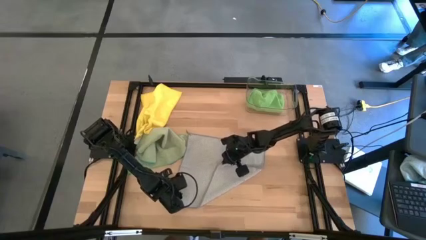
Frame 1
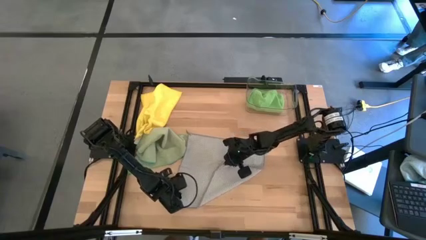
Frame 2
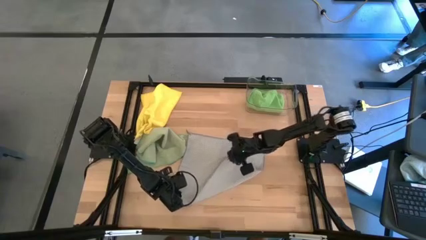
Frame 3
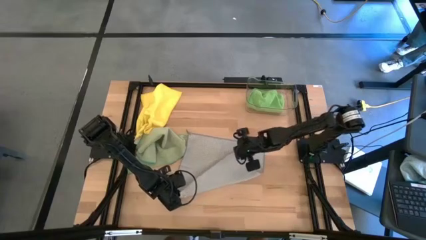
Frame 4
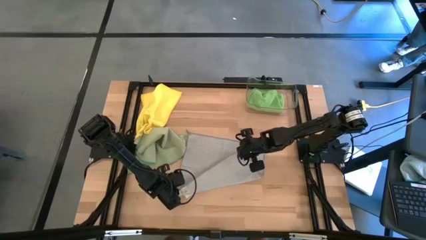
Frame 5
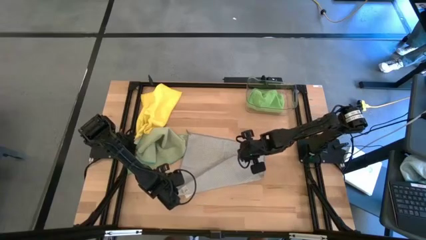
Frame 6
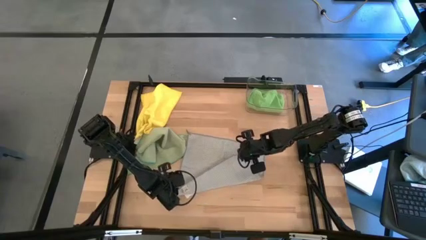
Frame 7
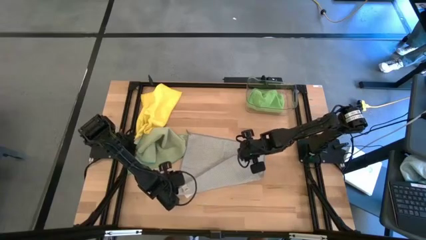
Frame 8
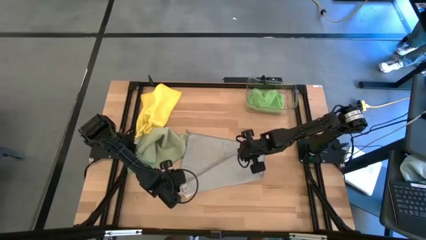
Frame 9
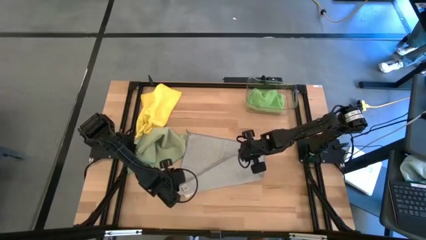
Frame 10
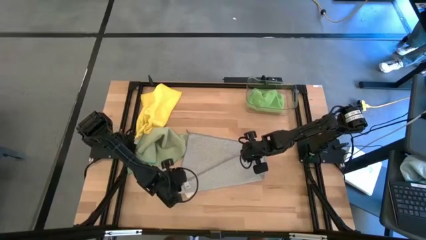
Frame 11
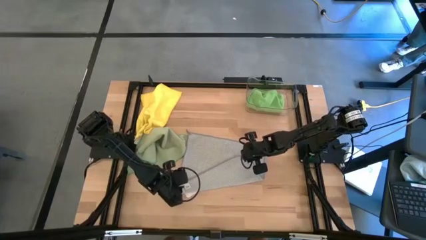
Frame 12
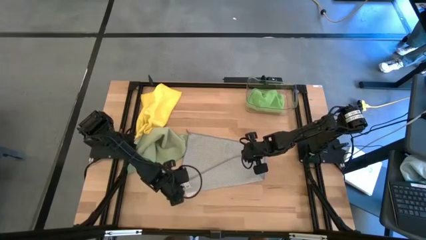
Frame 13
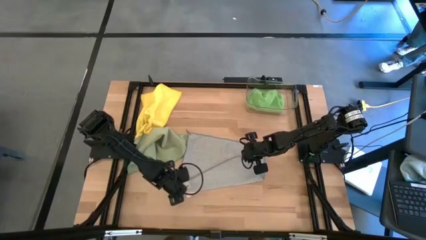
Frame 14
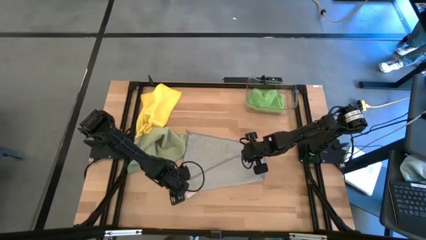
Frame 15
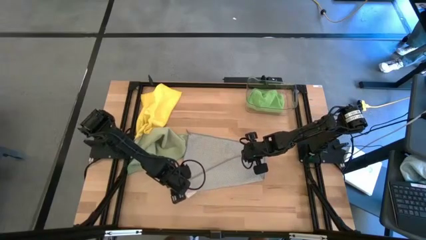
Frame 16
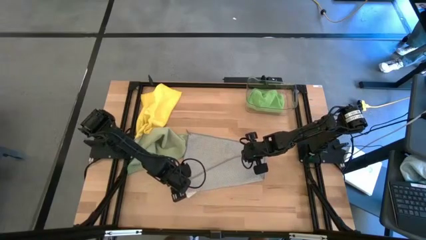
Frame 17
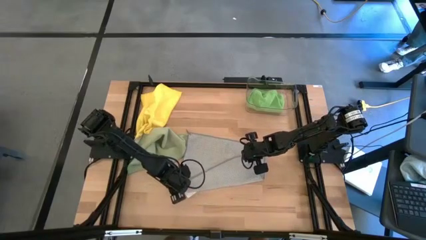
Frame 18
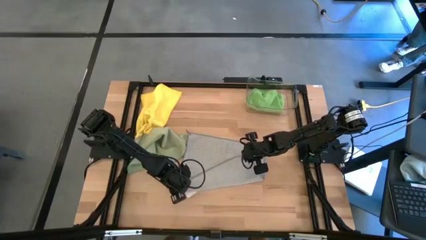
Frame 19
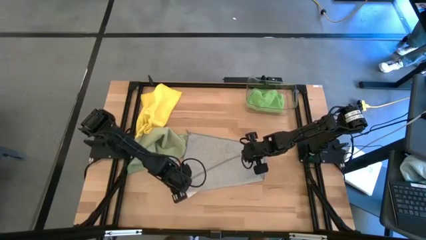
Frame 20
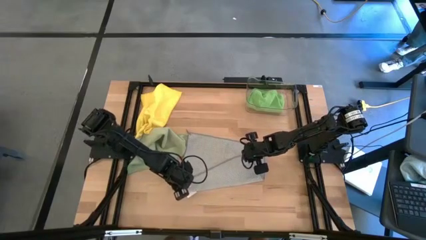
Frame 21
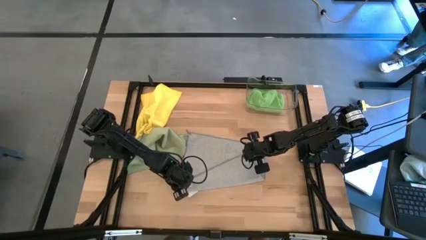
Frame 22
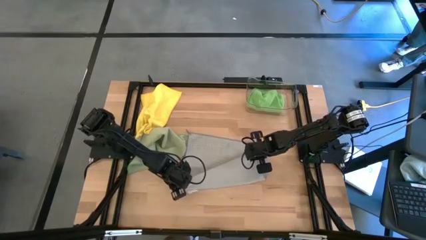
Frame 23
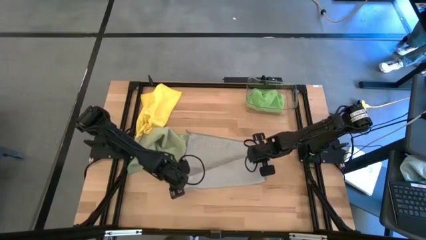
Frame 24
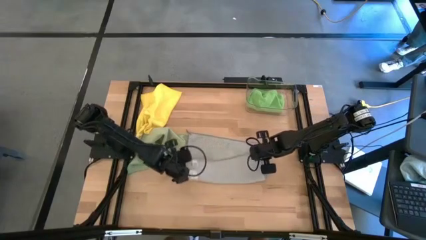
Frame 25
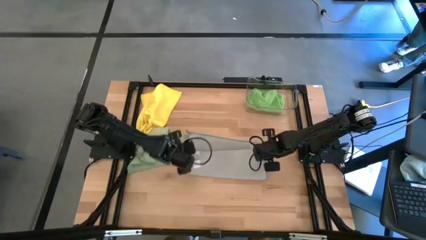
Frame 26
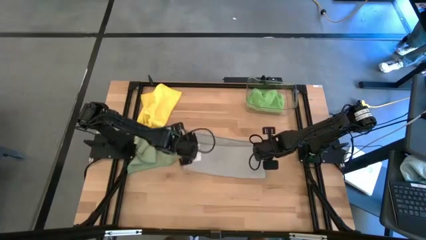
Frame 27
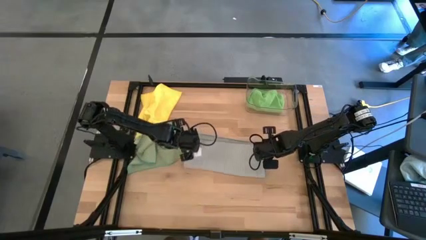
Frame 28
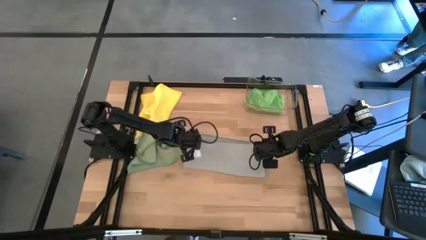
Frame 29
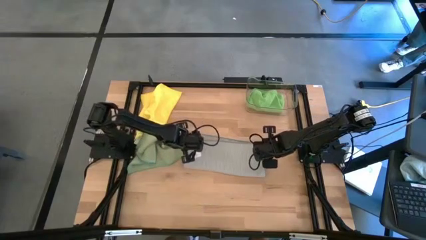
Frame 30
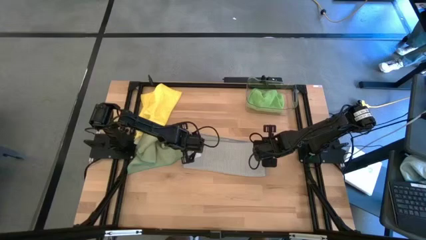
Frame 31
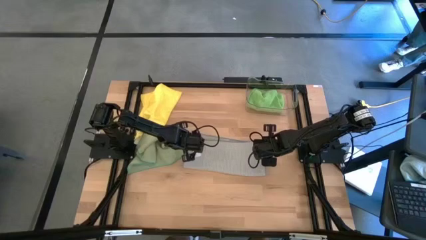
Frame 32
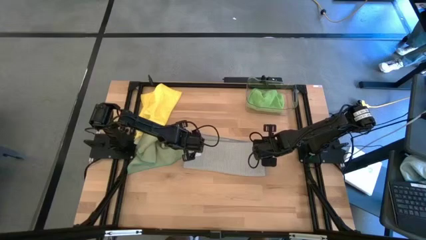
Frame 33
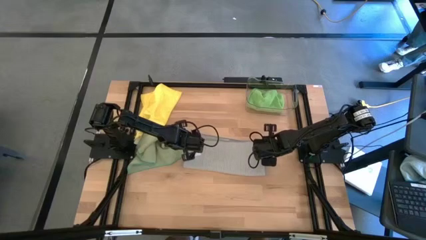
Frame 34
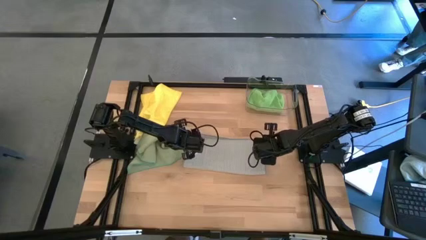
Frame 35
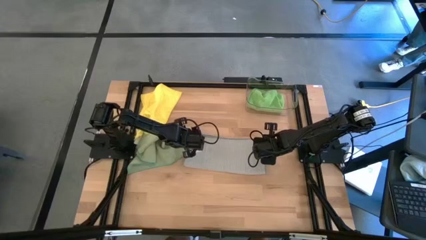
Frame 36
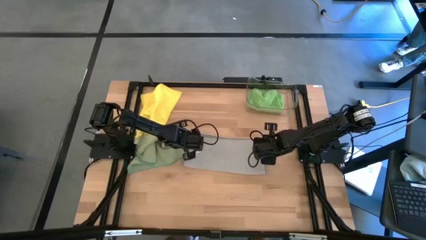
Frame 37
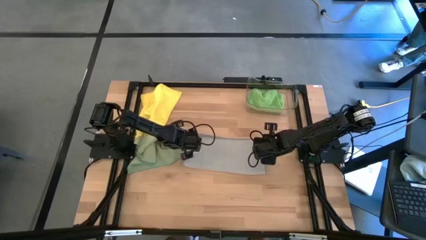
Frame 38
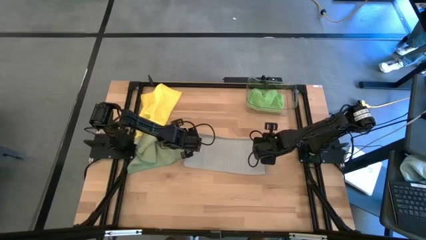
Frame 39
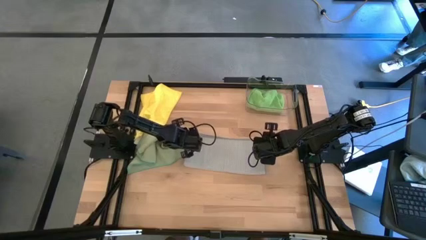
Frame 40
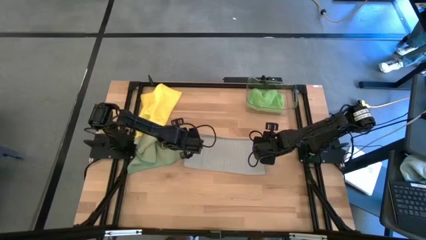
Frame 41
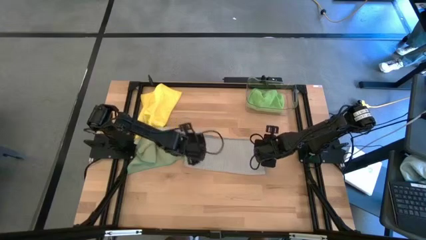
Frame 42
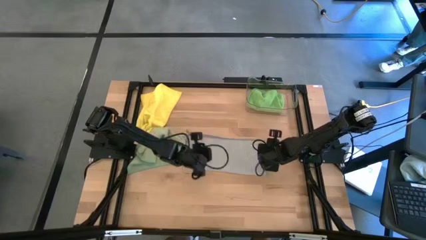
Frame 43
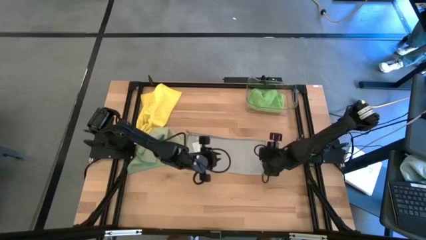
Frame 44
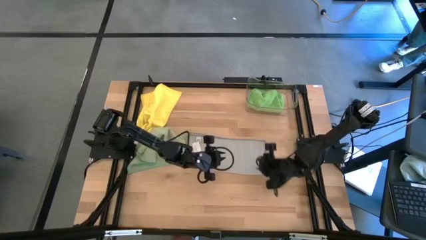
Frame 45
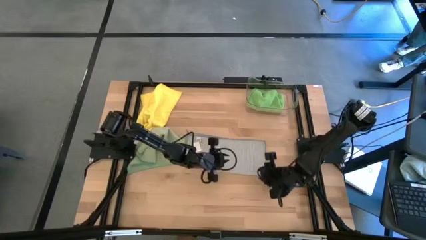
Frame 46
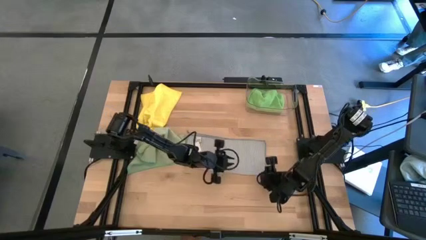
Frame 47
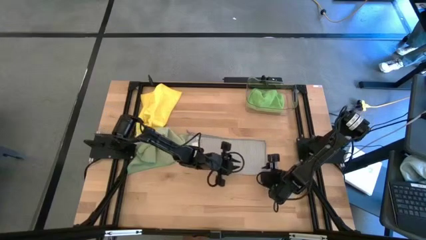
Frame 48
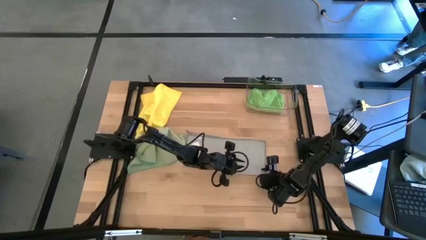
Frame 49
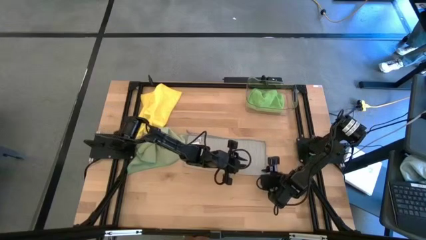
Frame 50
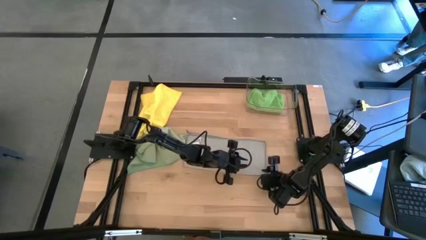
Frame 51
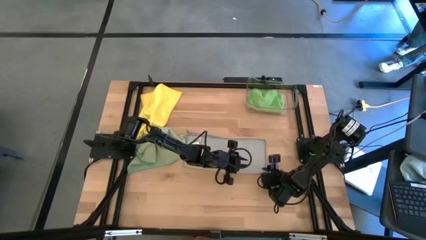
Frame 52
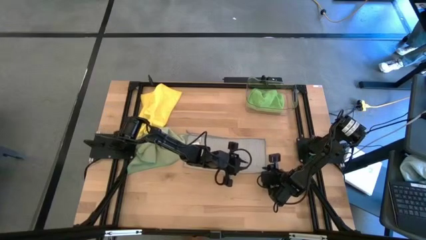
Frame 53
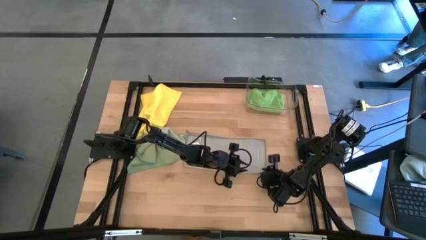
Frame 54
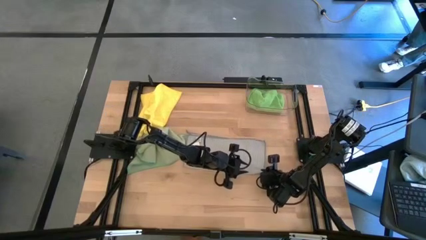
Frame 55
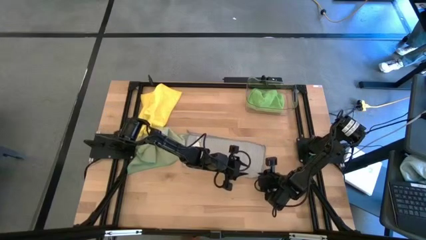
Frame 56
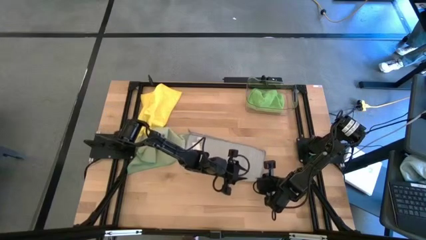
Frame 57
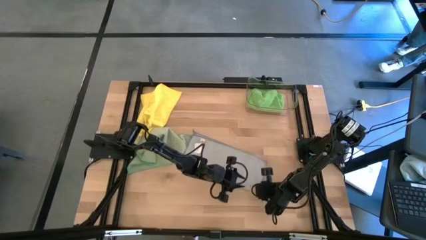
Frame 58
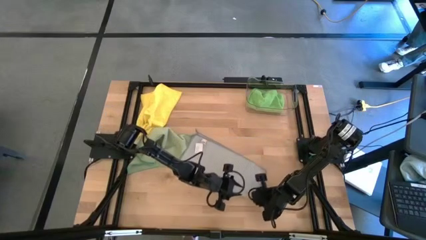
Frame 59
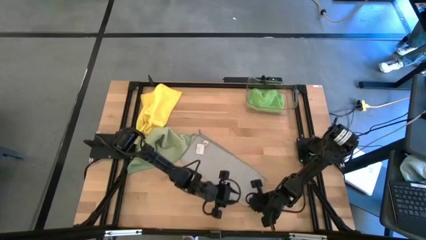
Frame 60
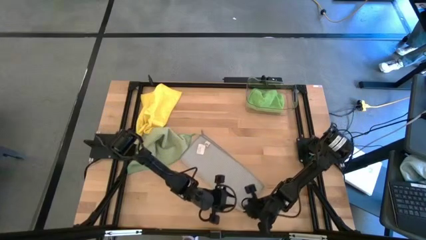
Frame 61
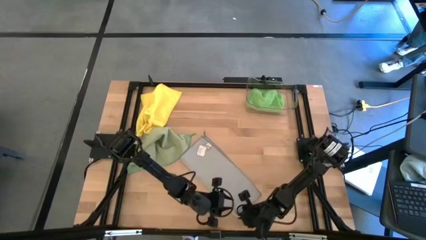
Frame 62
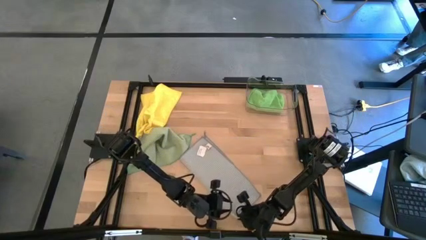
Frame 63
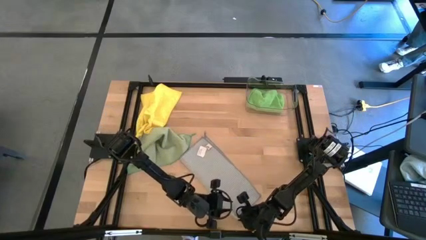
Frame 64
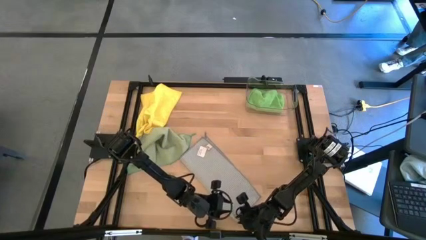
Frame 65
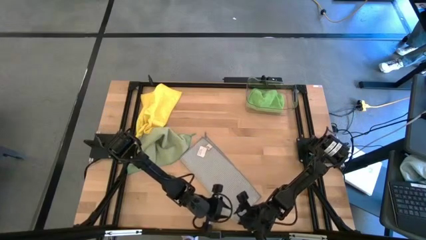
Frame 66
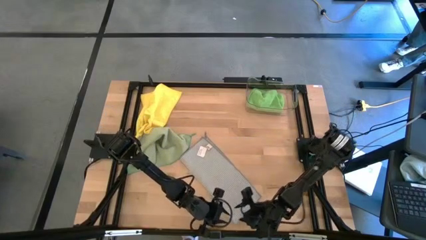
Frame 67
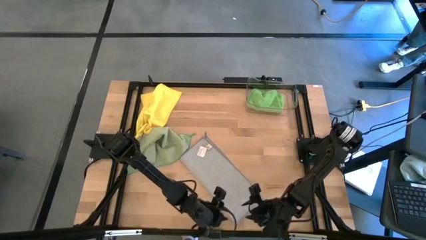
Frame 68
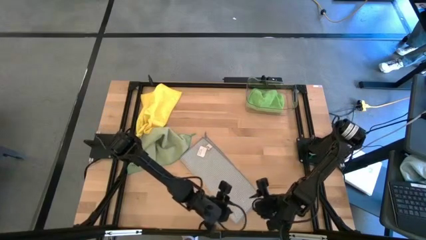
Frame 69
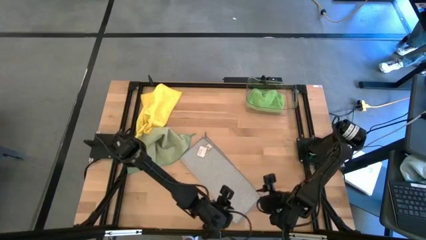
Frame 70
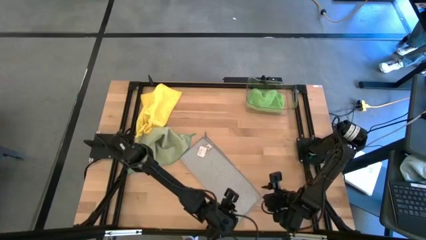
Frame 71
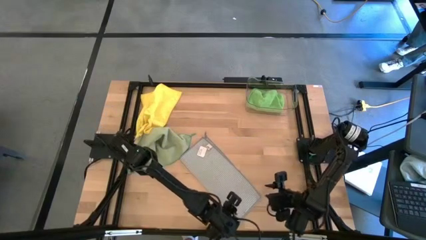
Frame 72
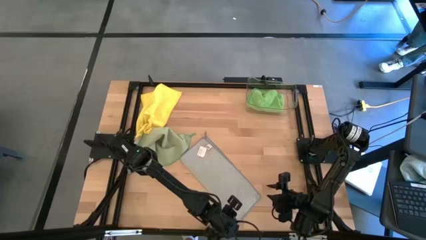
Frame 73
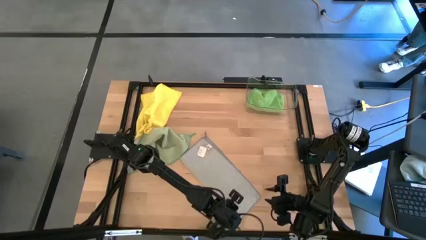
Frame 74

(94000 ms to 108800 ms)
Task: Fold microfiber towels
Fold the gray cloth
